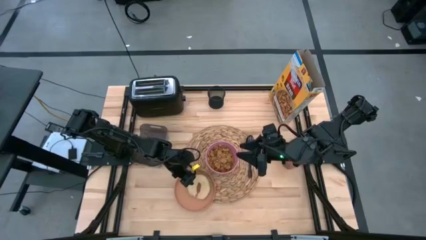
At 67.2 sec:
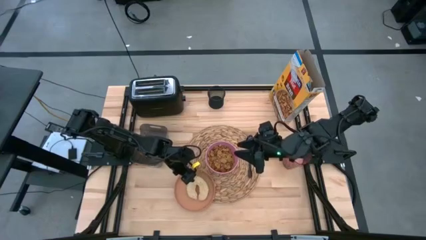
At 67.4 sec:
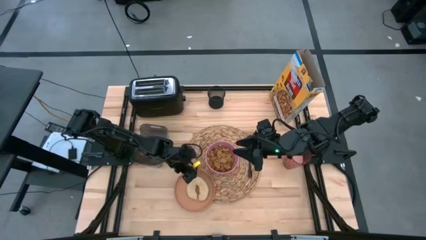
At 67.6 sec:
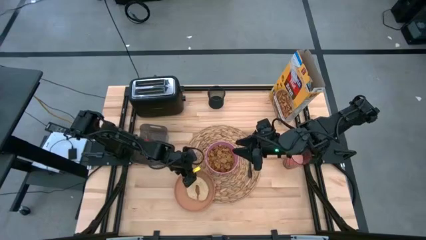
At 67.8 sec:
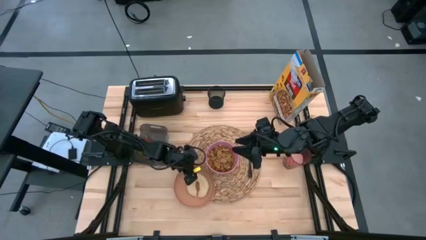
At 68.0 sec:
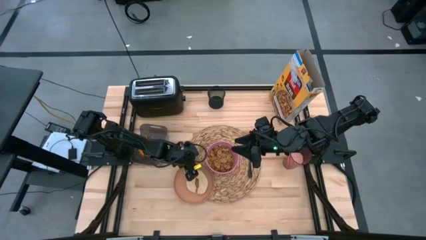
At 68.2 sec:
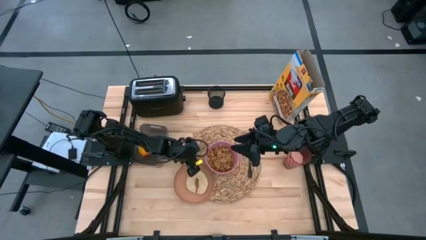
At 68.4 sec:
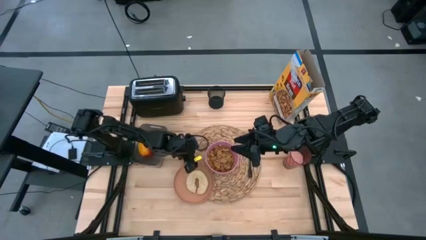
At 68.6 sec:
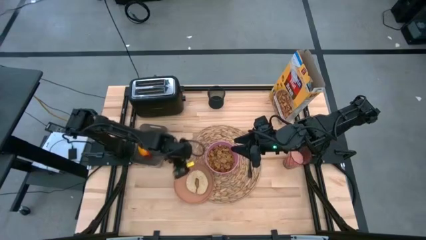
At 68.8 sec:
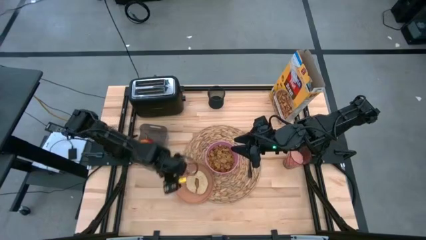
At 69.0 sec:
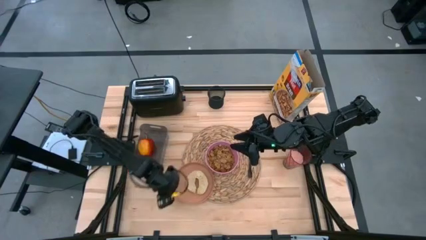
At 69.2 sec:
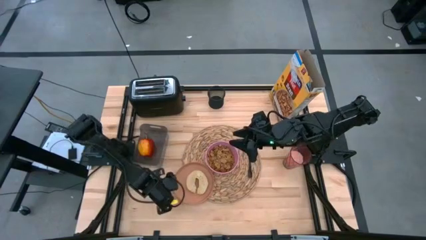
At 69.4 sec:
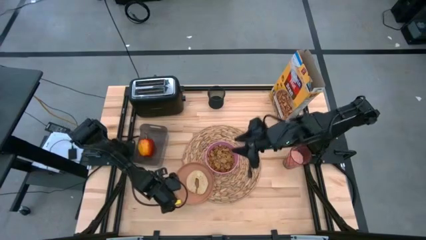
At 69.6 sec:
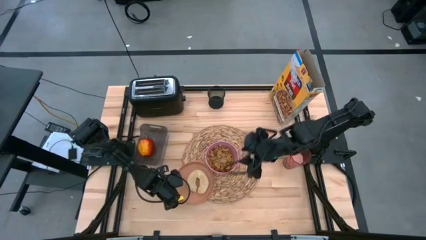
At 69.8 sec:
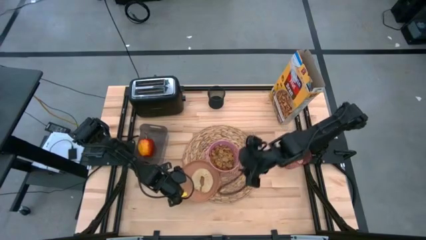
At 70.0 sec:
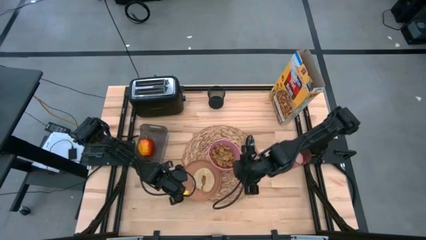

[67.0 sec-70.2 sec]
Task: Arrange a breakfast setting
Adjust the orange plate

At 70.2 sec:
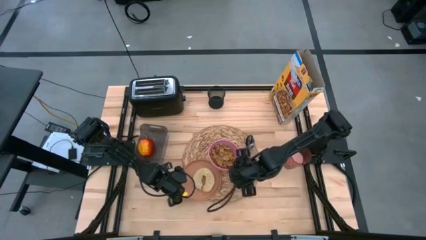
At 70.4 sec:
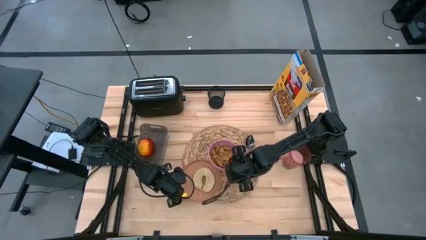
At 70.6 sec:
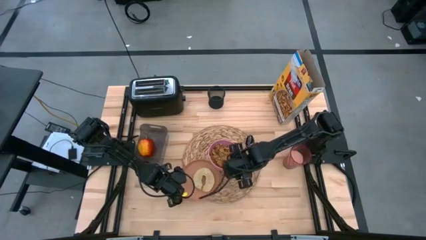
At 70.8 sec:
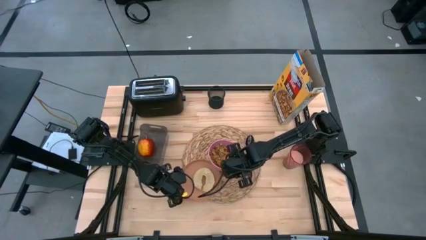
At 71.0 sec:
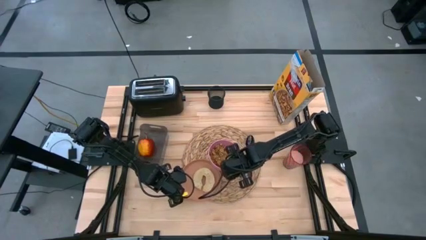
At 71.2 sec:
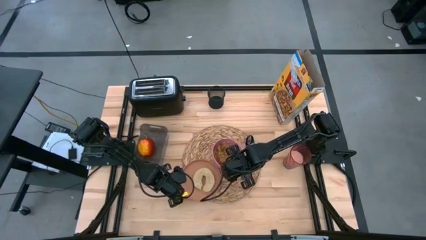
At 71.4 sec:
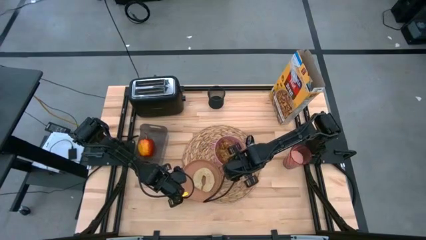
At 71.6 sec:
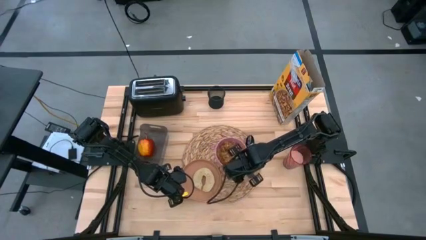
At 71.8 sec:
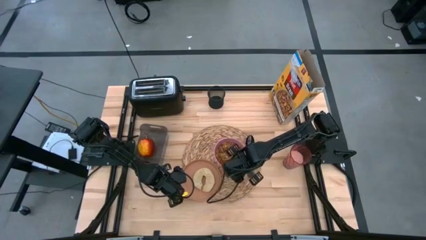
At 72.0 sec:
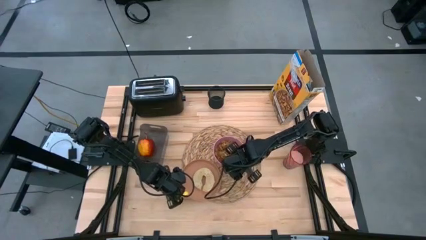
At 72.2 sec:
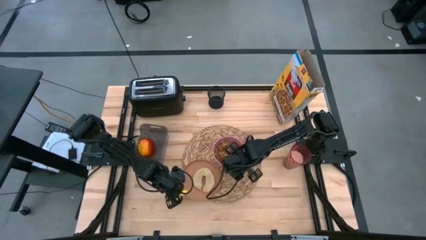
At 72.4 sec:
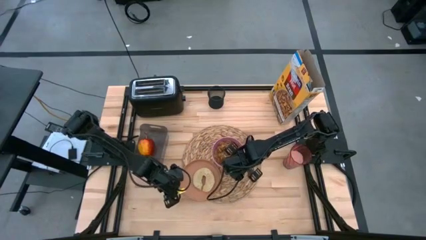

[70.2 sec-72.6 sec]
Adjust the pink bowl

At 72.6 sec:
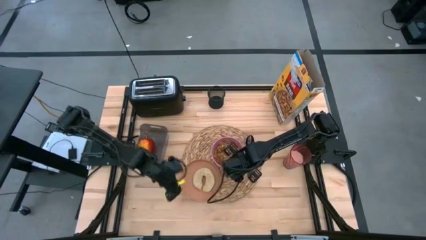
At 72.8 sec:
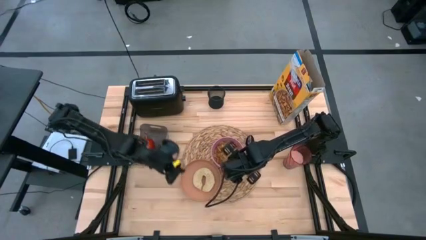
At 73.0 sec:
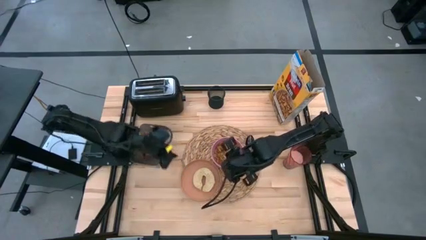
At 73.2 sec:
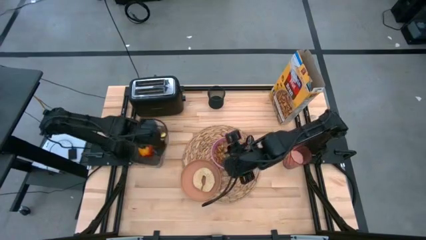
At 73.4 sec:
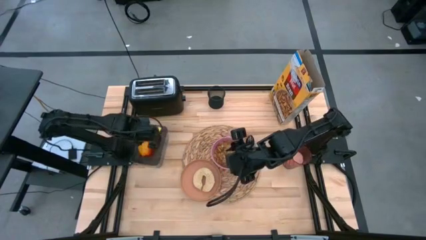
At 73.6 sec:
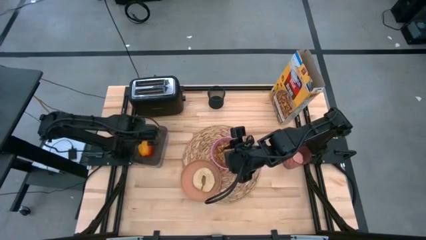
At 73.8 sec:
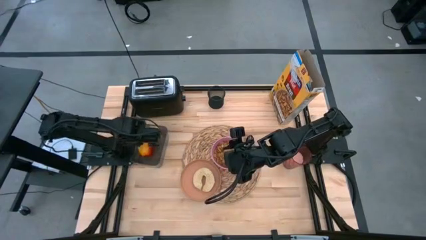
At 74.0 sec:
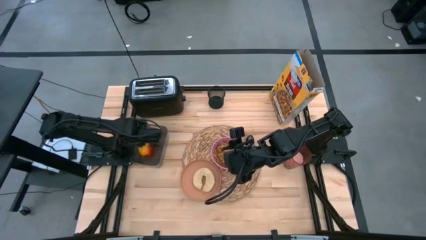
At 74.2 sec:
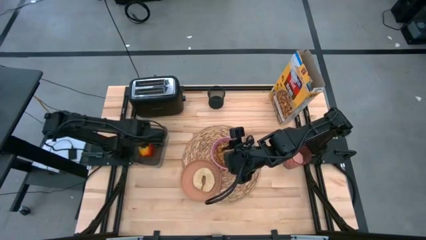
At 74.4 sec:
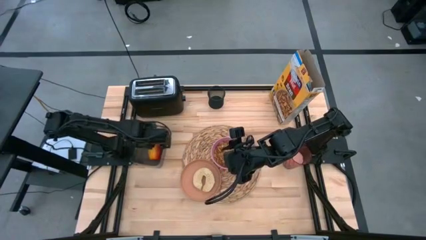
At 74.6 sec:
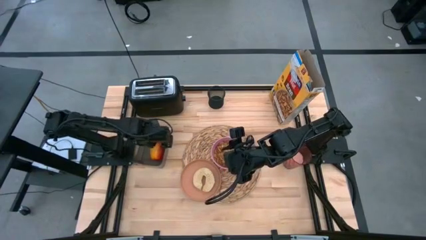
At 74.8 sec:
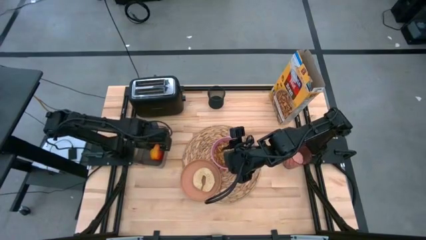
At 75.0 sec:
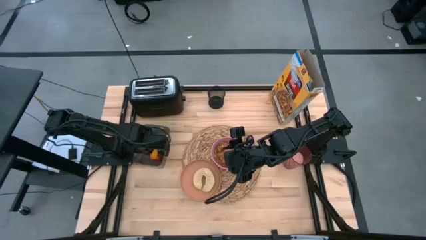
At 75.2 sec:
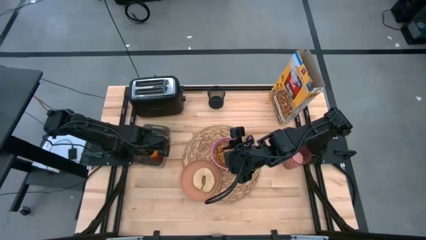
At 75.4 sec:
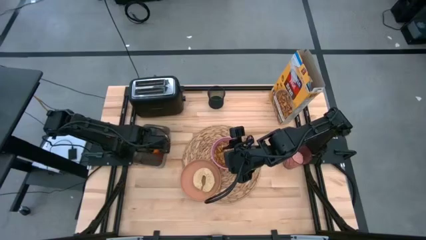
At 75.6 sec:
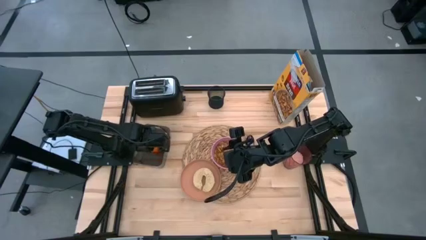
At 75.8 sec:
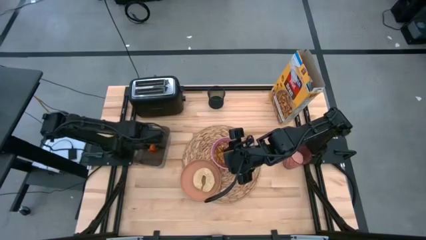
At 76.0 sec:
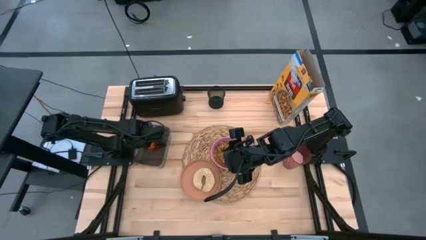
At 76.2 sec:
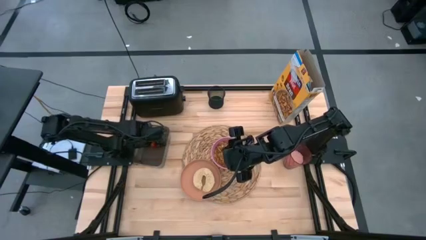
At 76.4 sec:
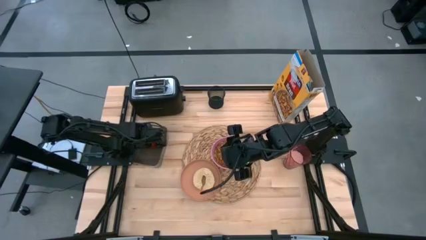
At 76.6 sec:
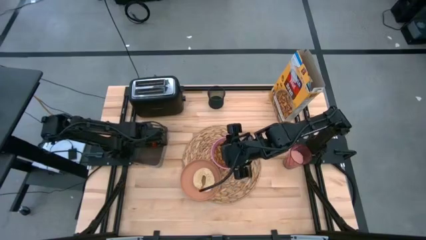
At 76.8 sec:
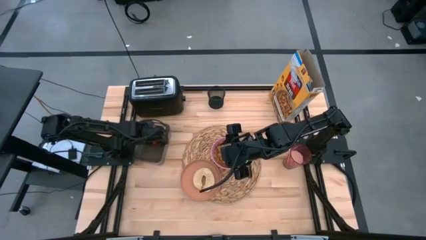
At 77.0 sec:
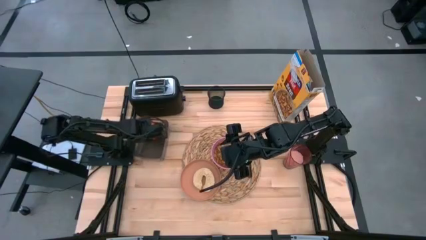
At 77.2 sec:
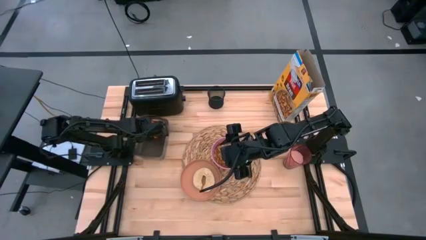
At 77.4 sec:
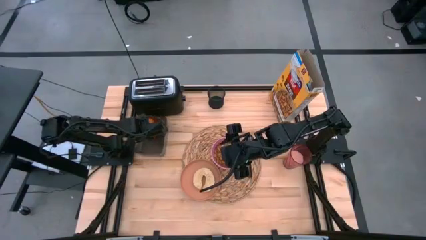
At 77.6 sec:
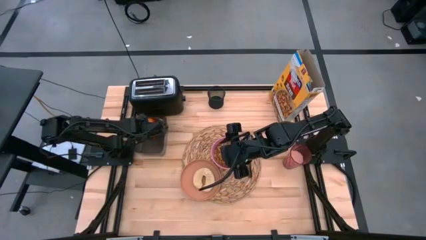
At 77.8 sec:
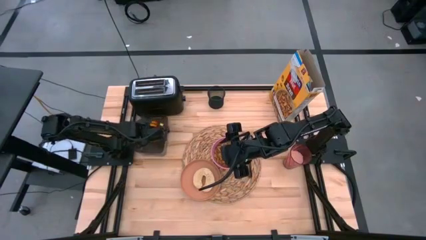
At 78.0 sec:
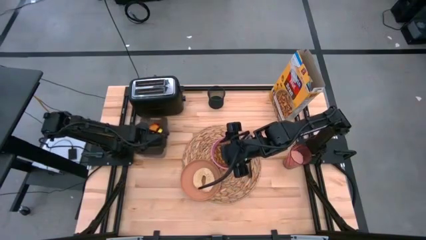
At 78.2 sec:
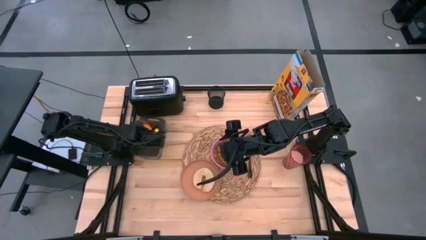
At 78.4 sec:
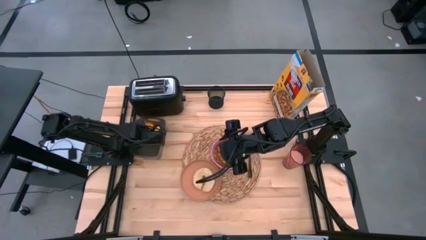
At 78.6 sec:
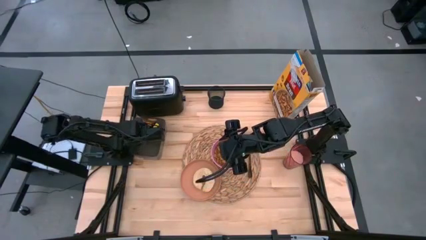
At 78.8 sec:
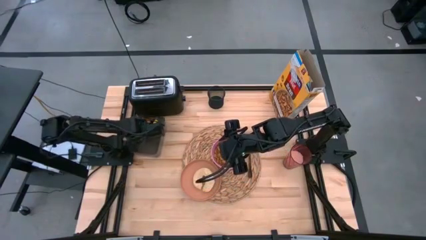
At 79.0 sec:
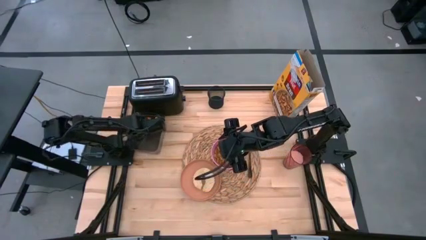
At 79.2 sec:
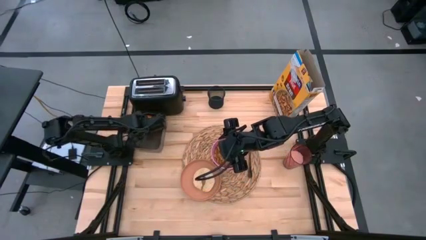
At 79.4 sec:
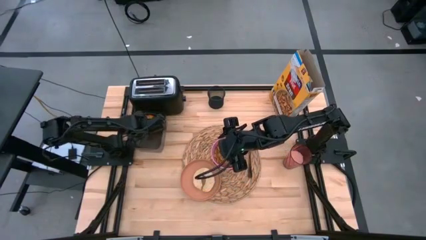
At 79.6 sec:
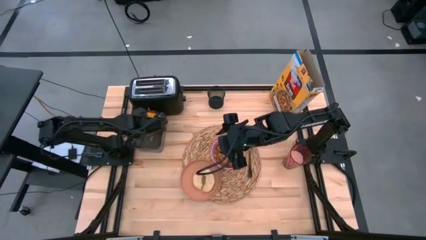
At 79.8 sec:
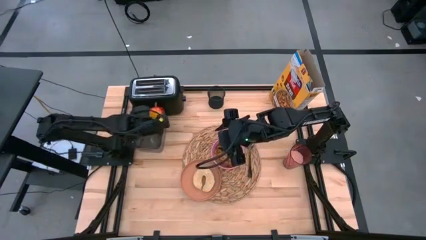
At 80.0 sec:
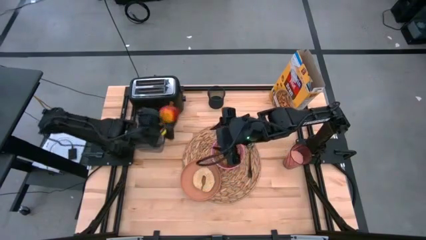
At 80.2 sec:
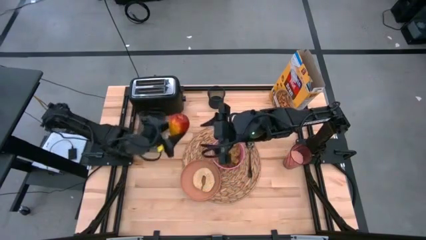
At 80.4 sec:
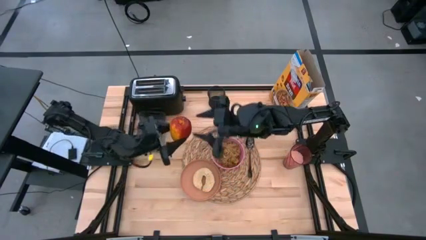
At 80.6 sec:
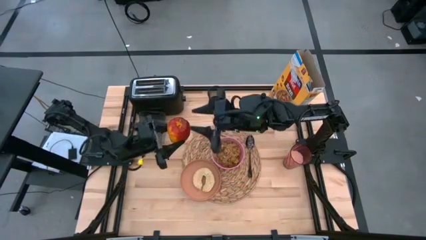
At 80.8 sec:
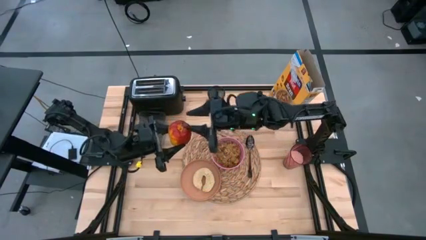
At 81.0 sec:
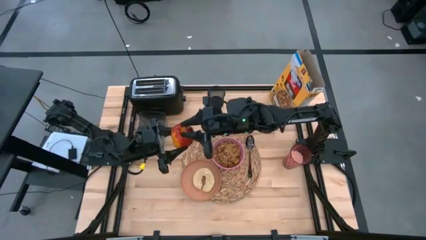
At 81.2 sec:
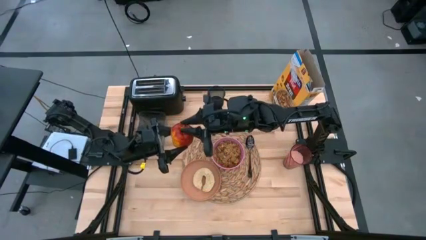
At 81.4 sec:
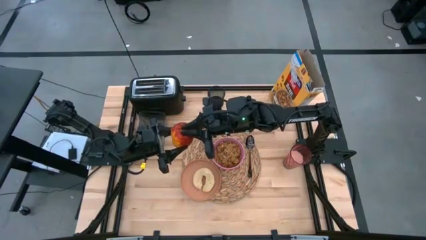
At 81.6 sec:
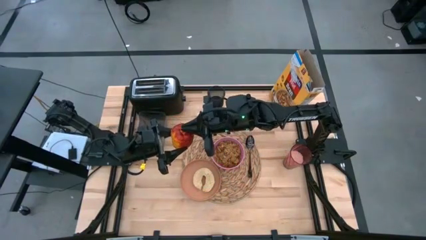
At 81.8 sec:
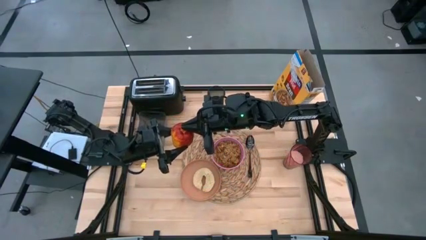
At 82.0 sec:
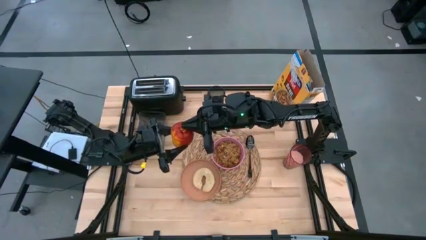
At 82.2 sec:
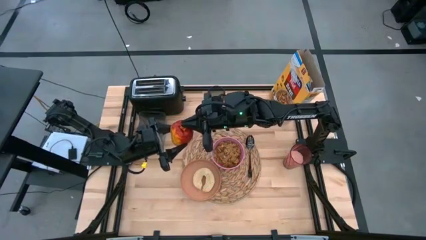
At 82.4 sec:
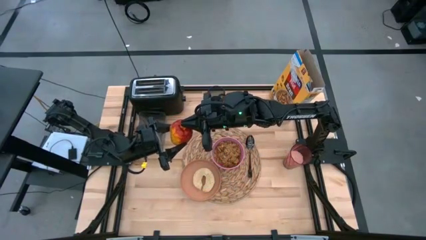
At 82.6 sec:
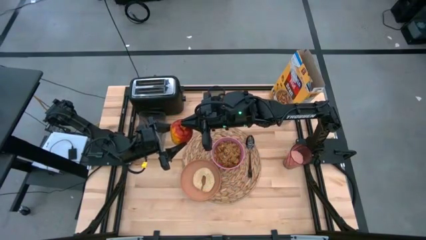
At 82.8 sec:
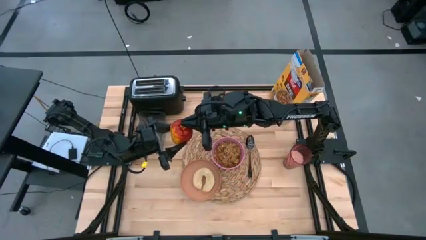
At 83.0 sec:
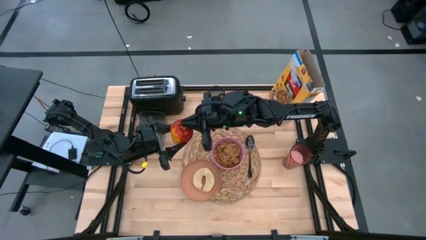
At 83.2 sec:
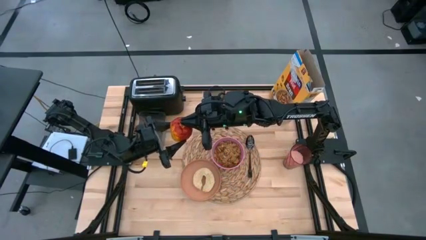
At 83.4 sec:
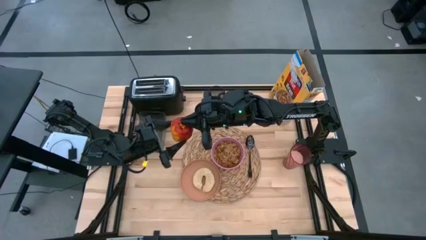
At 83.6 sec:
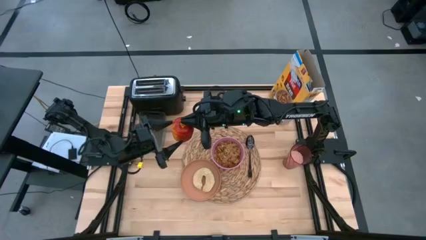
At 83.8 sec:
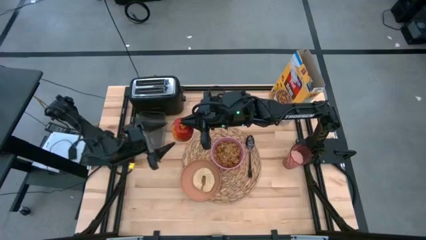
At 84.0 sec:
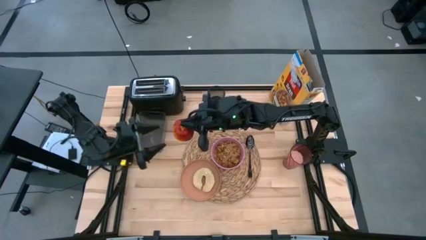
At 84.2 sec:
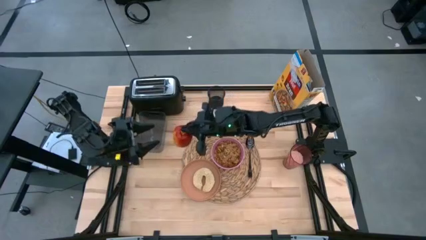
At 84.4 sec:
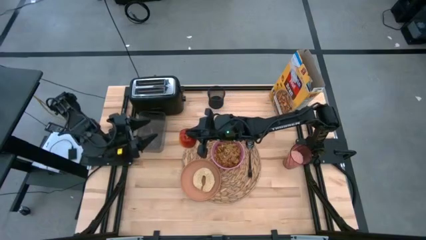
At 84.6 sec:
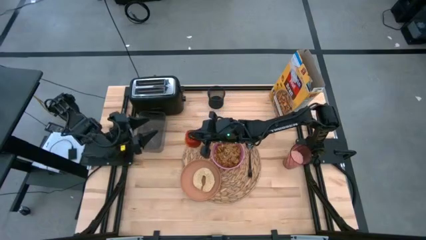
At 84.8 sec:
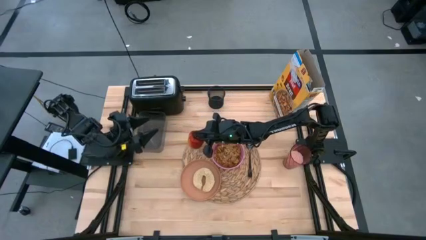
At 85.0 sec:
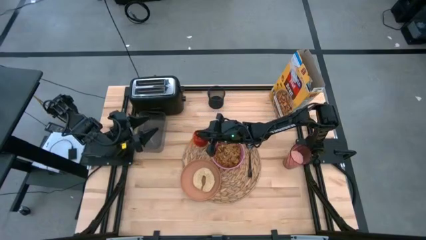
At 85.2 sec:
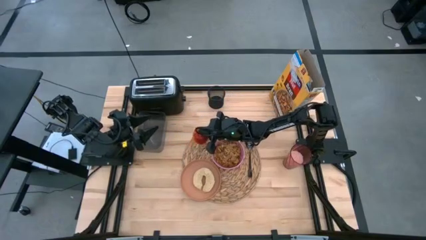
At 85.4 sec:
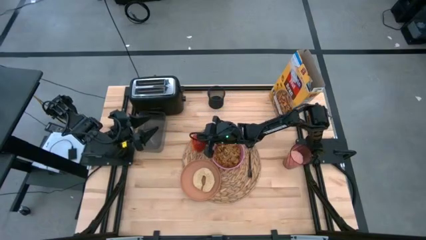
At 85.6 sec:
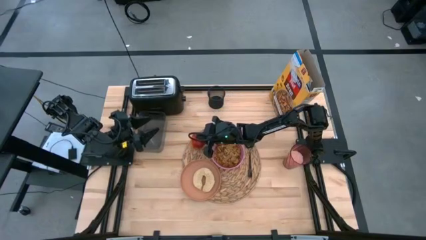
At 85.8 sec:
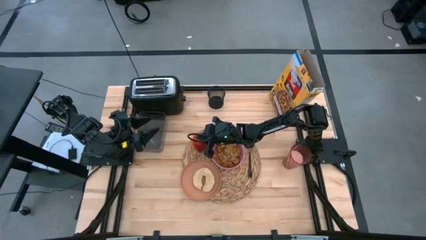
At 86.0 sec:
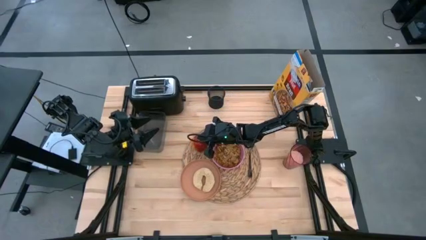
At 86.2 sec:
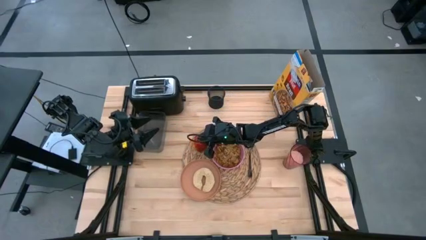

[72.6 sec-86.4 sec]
Put the red apple to the top left of the pink bowl
